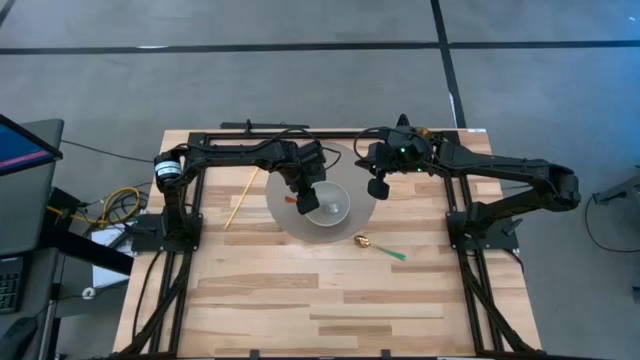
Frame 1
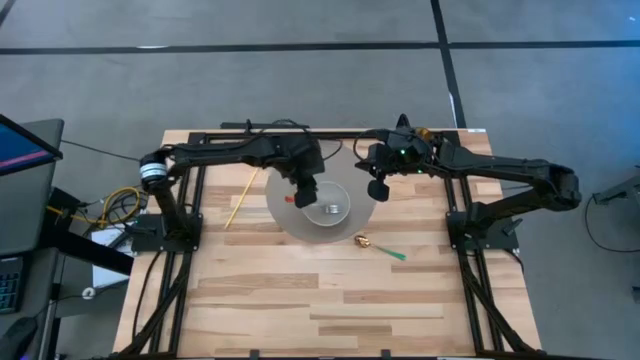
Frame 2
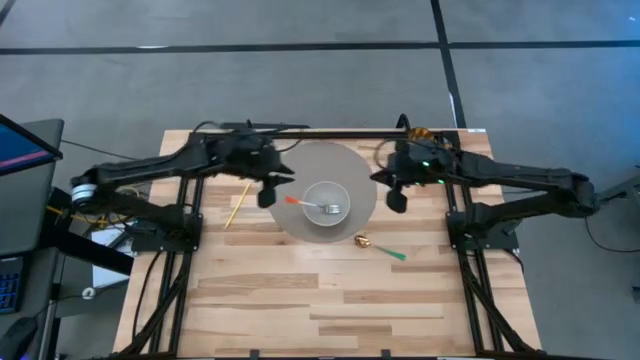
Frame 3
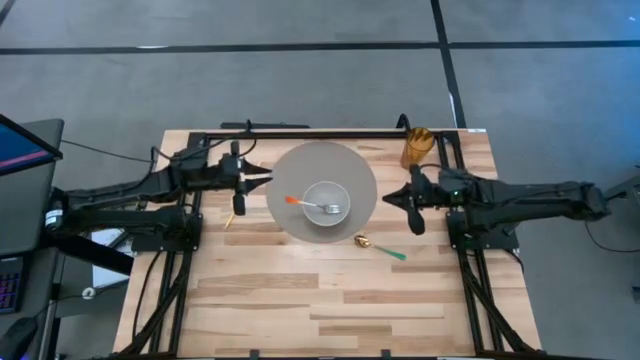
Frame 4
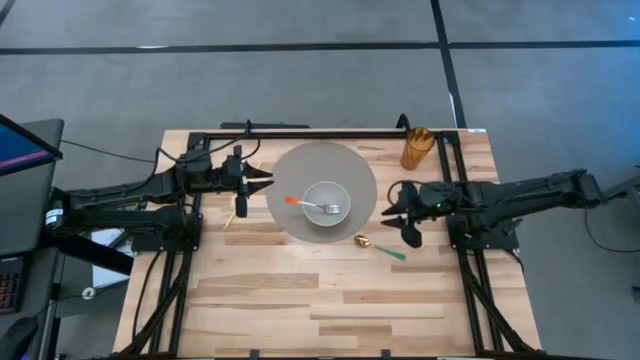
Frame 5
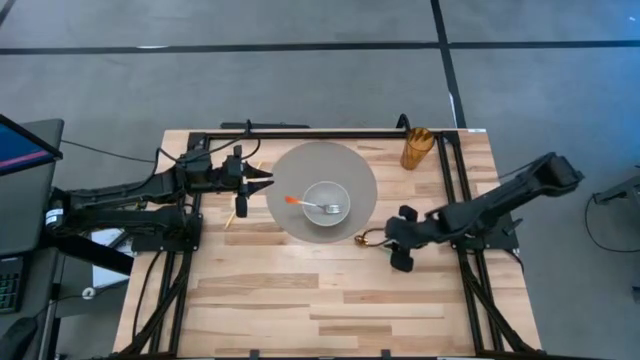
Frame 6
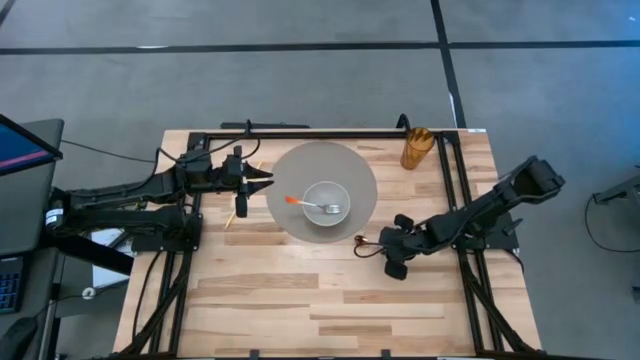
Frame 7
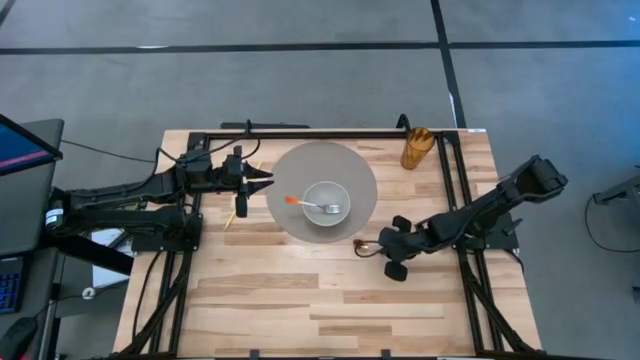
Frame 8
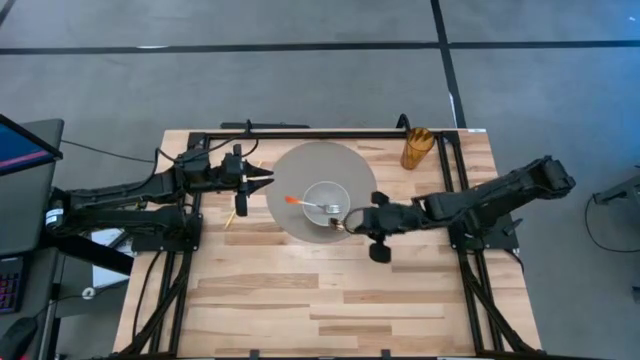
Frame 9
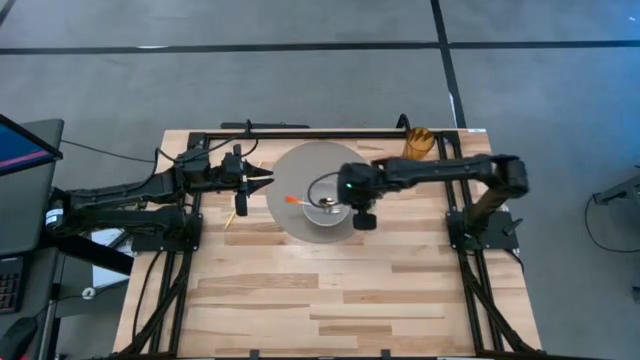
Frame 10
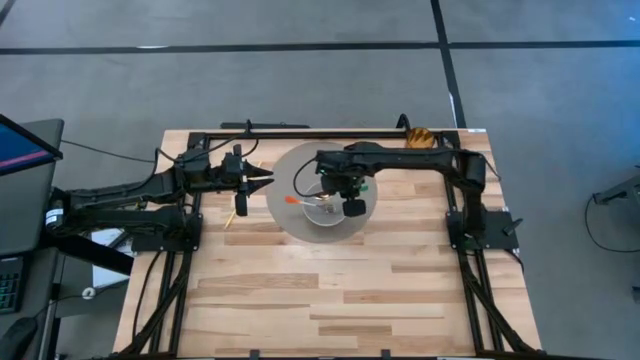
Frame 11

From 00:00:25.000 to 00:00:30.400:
Task: Pick & Place Utensil
Put the green spoon into the white bowl

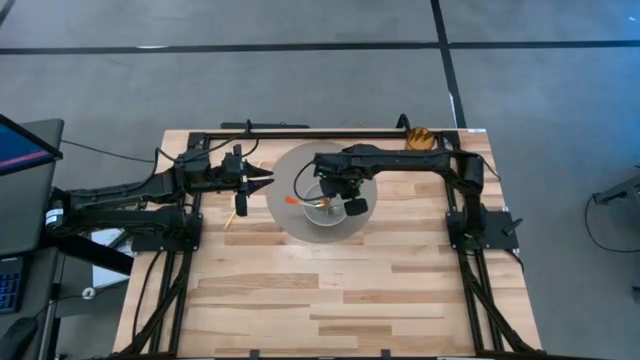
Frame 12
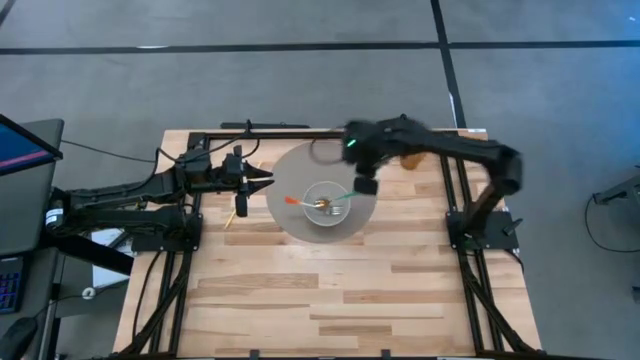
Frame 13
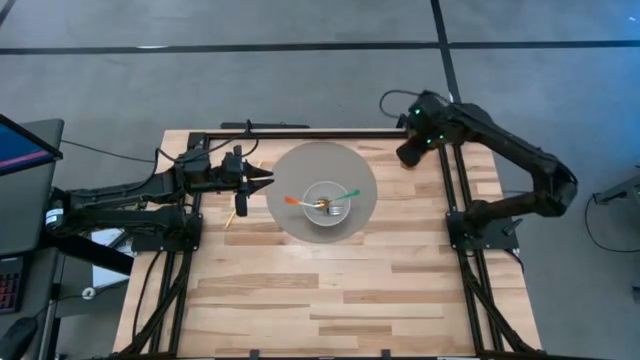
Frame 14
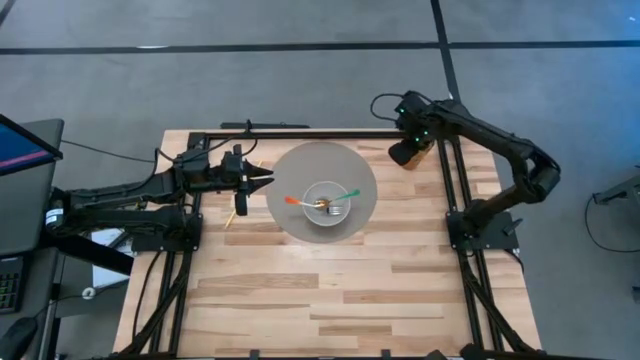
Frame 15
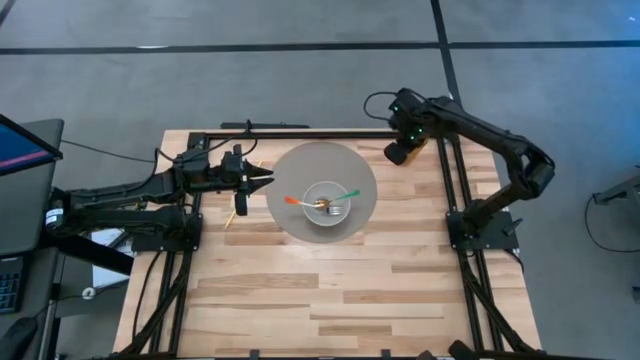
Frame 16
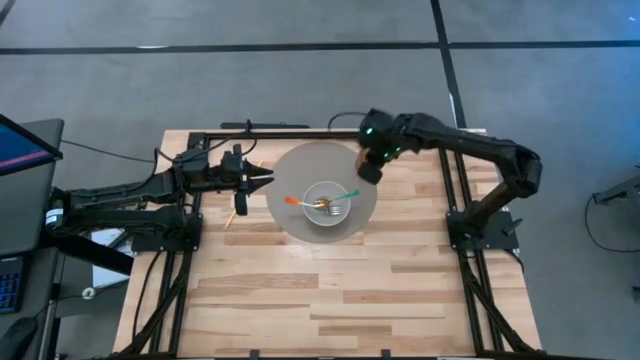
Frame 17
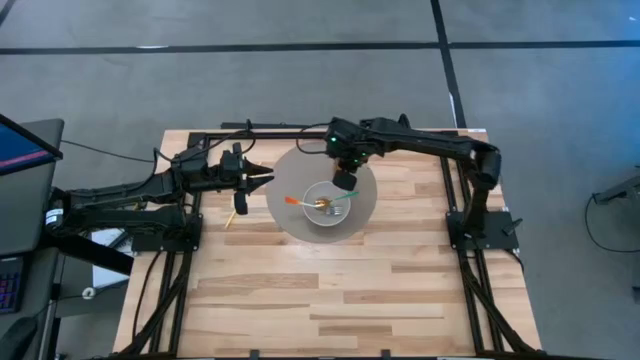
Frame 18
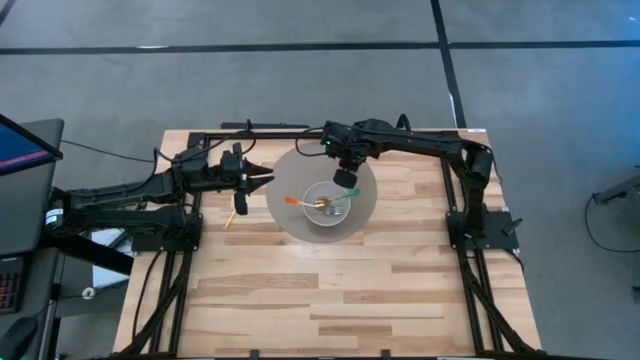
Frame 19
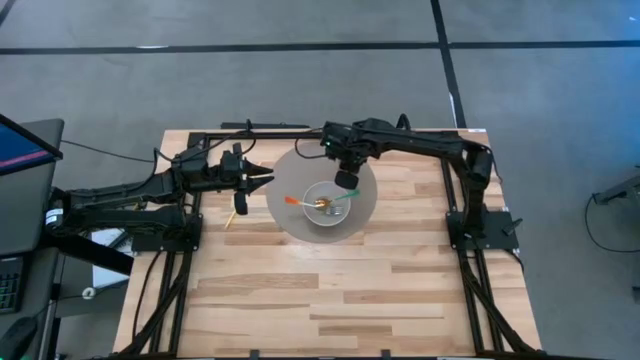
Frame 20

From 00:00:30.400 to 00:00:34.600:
Put the yellow cup on the gray placemat to the top right of the white bowl

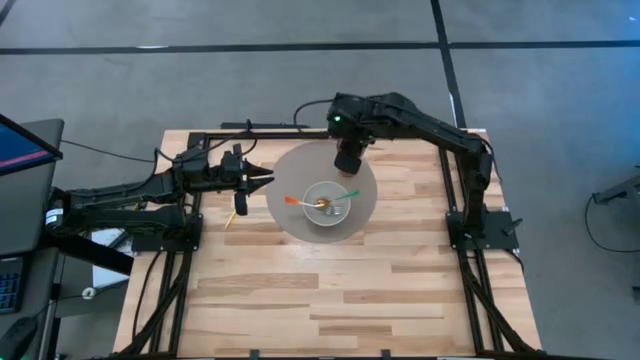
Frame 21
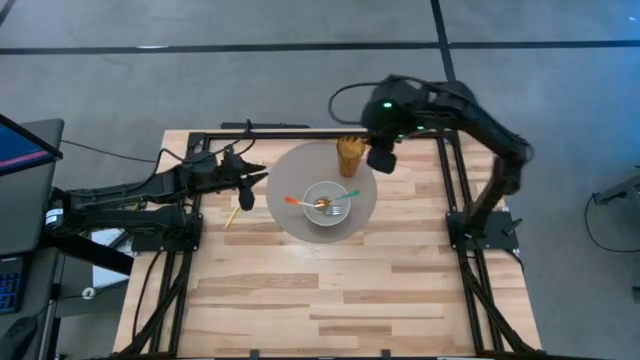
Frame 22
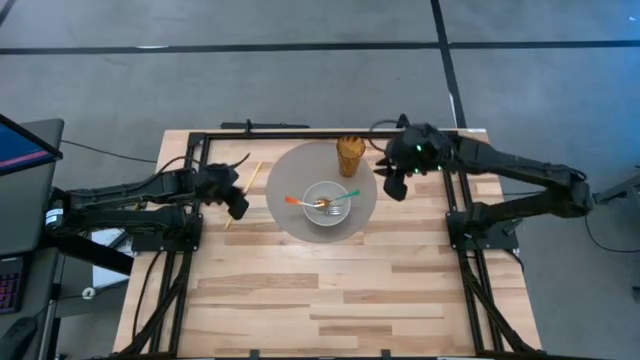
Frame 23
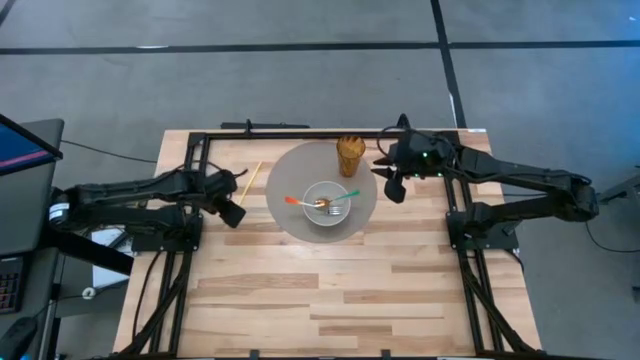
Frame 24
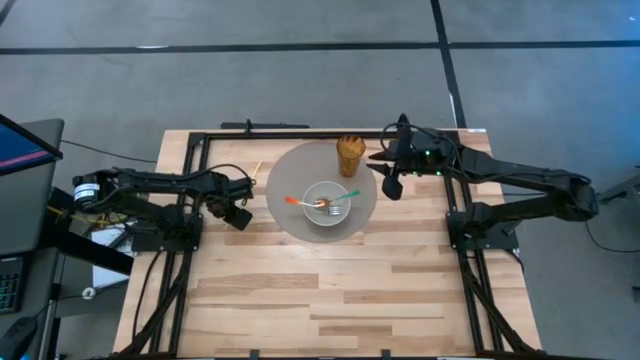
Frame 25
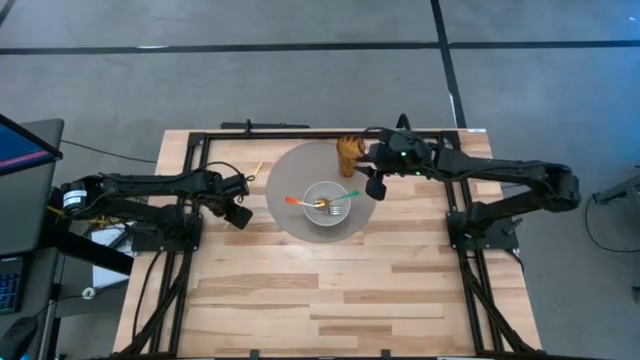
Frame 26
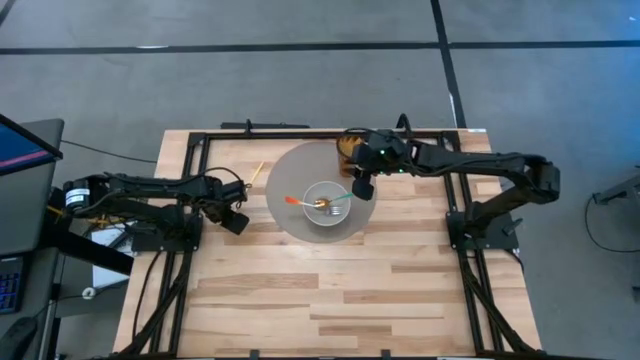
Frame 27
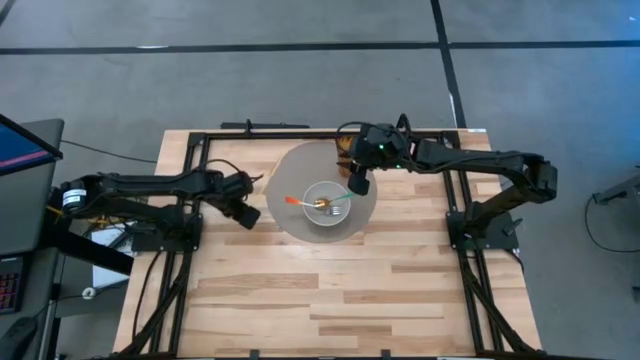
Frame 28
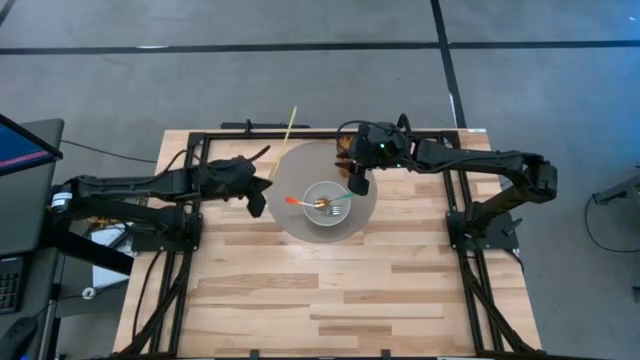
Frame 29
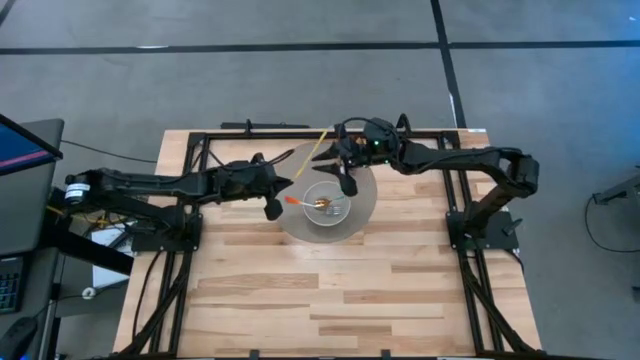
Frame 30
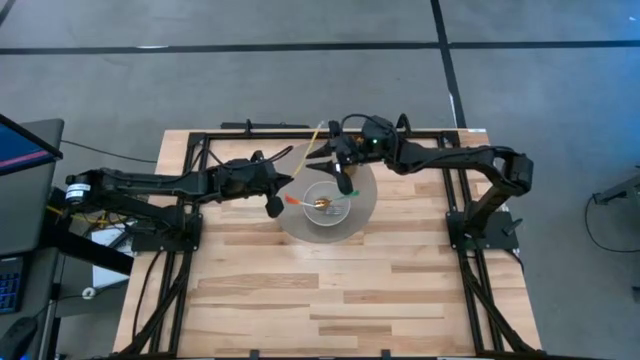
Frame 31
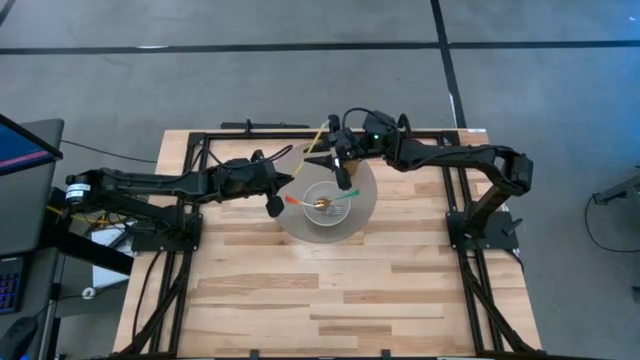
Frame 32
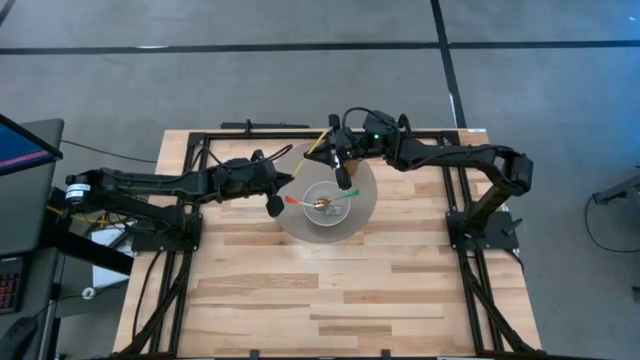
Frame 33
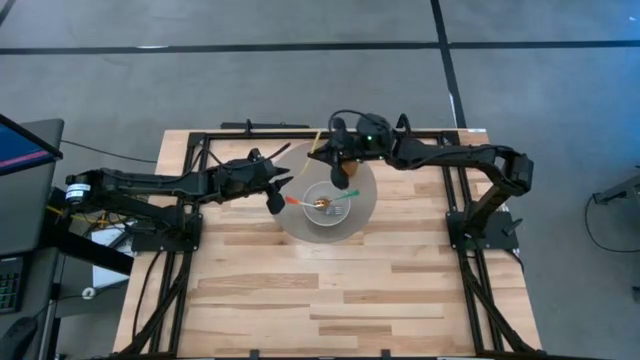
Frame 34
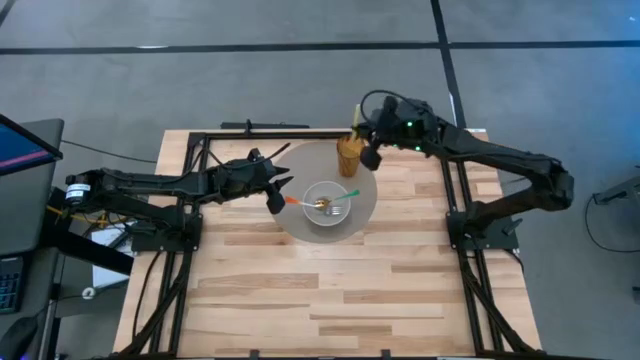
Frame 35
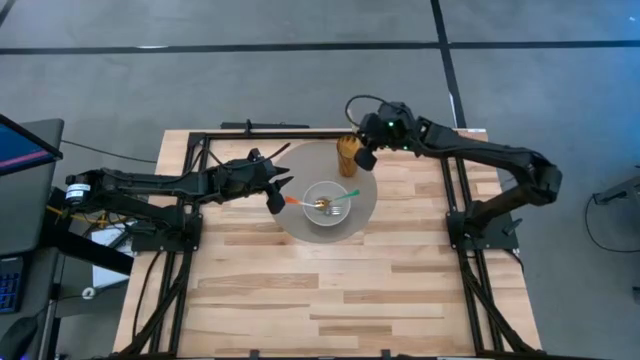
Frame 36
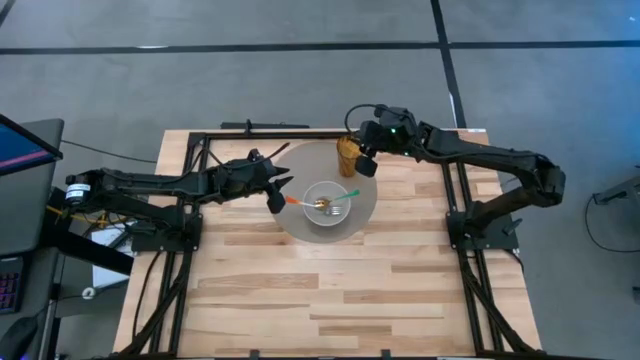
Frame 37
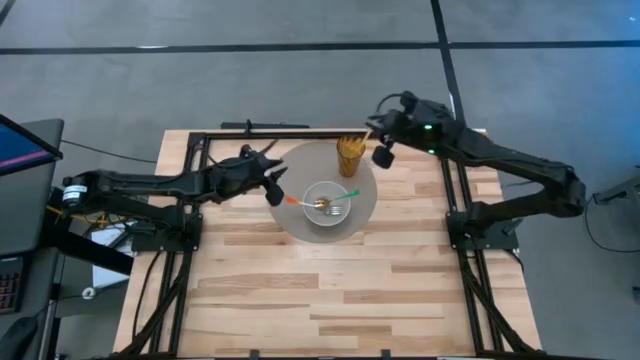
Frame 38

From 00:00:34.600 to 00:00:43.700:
Put the yellow drinking straw into the yellow cup

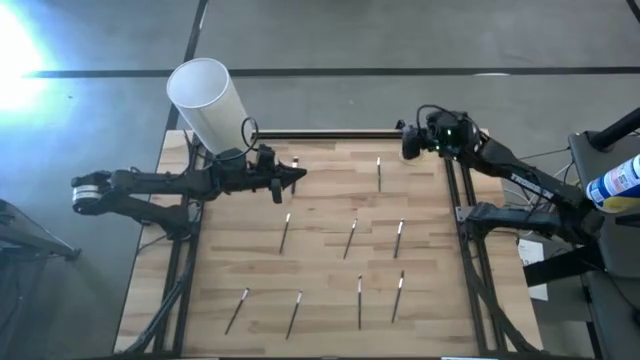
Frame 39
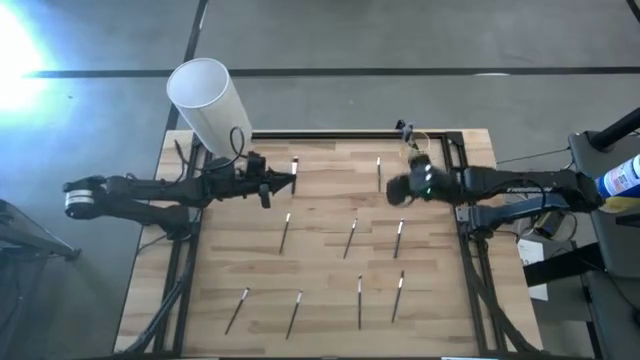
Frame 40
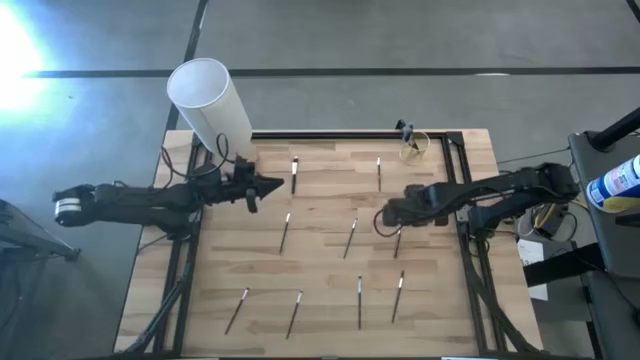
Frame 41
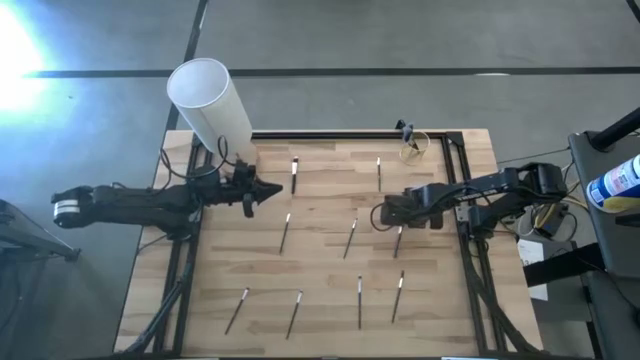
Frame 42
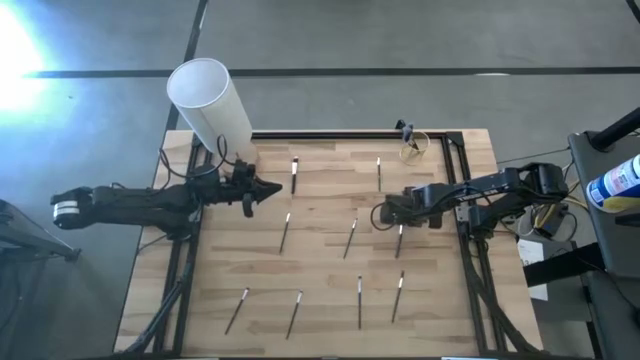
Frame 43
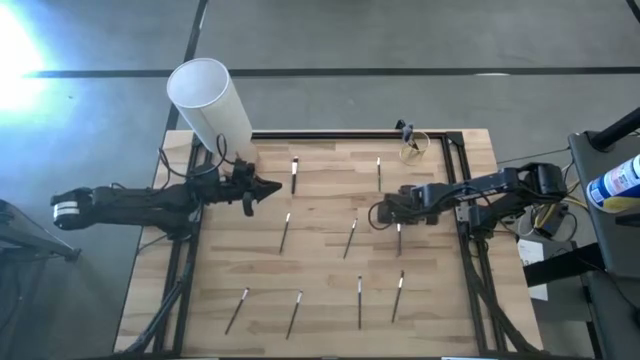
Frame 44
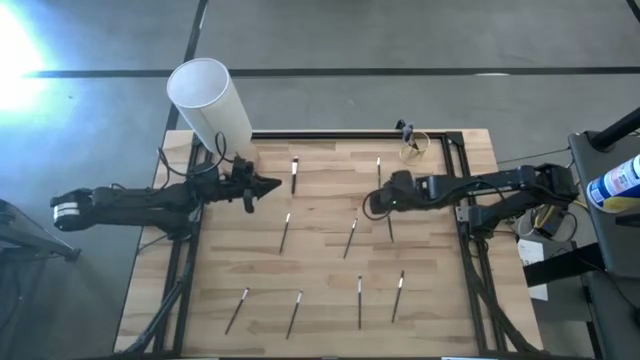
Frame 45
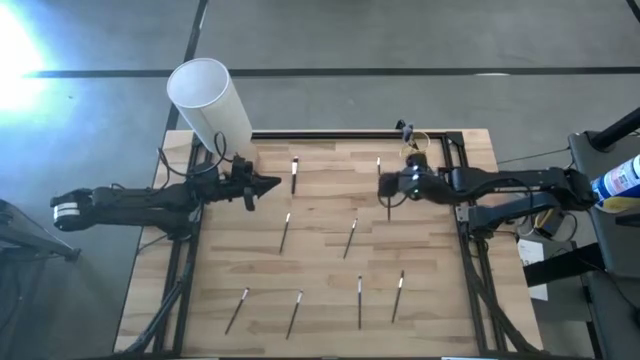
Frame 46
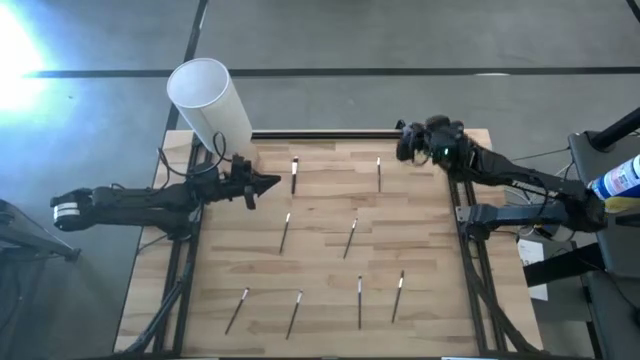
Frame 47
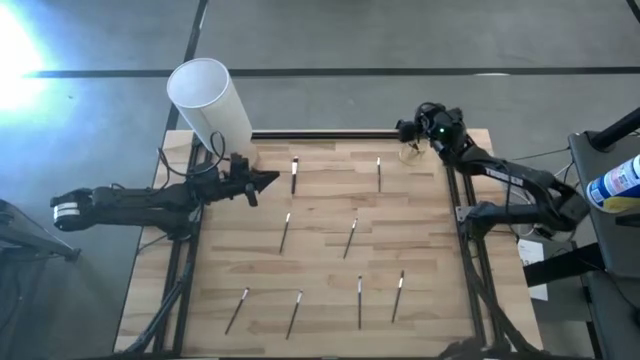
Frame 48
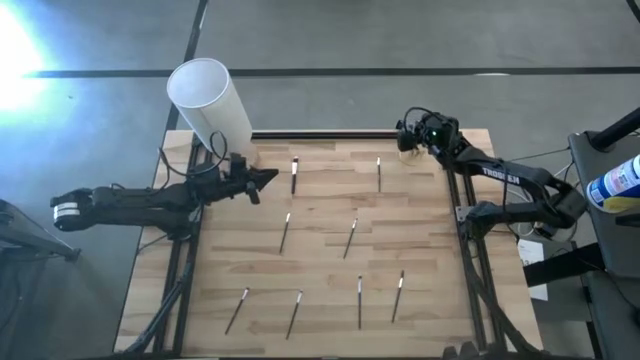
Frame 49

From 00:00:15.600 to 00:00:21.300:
Task: Put items in baskets/containers
Put the eyeshadow brush into the yellow container
